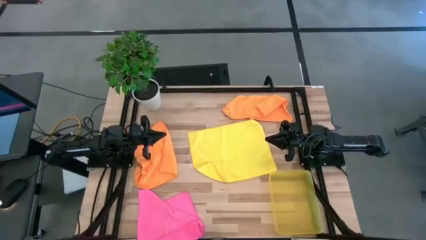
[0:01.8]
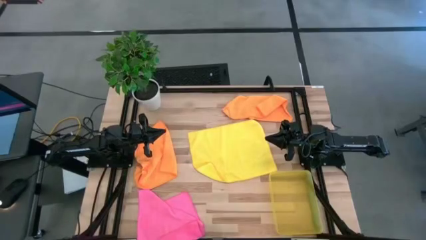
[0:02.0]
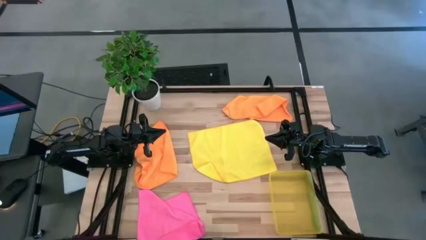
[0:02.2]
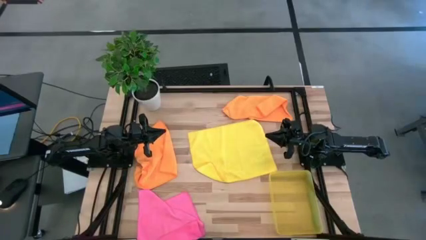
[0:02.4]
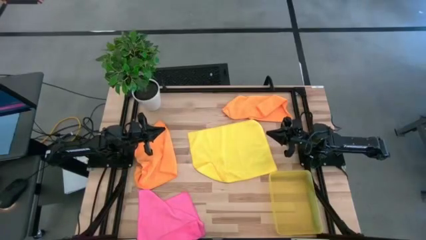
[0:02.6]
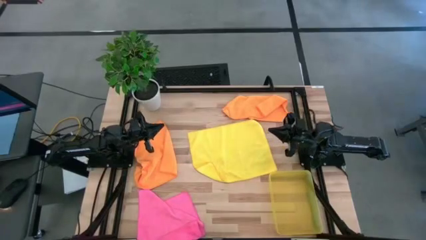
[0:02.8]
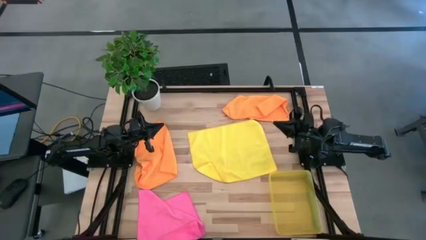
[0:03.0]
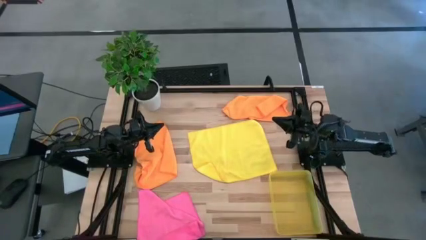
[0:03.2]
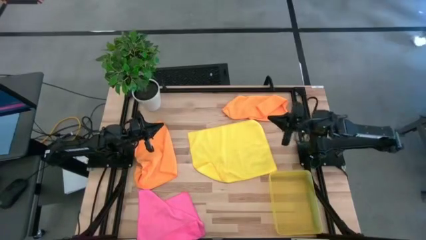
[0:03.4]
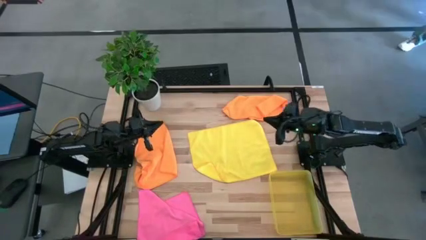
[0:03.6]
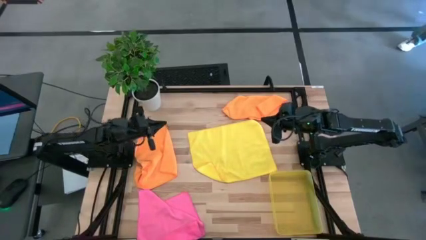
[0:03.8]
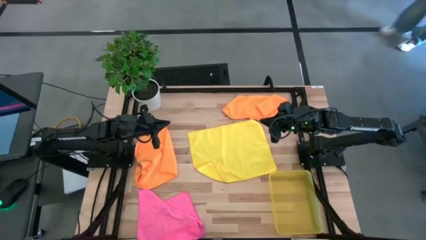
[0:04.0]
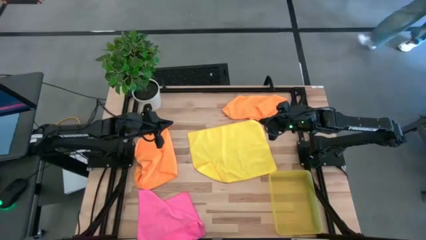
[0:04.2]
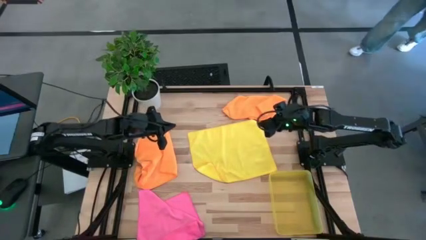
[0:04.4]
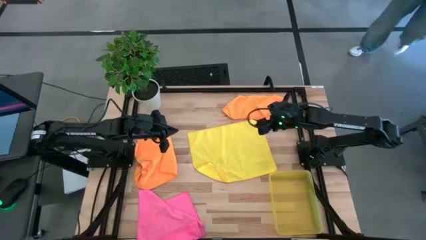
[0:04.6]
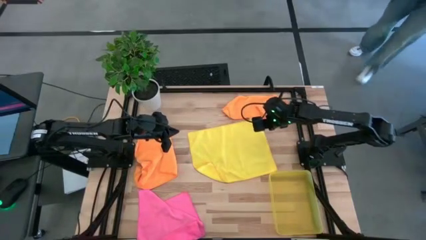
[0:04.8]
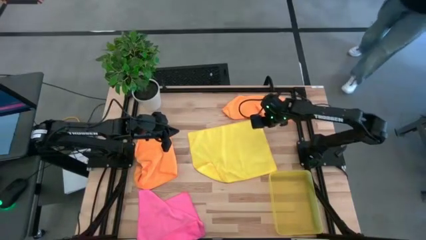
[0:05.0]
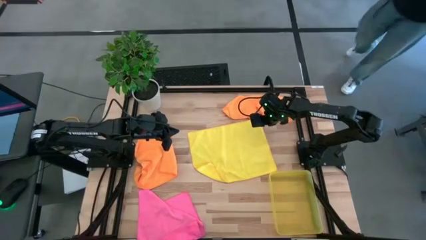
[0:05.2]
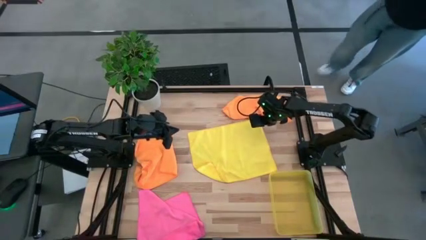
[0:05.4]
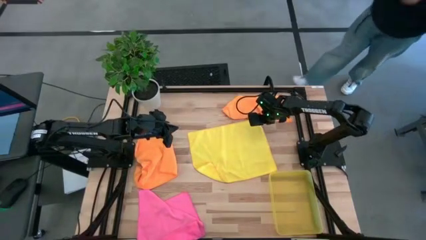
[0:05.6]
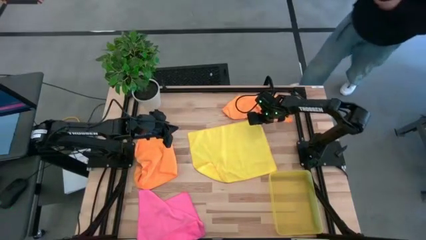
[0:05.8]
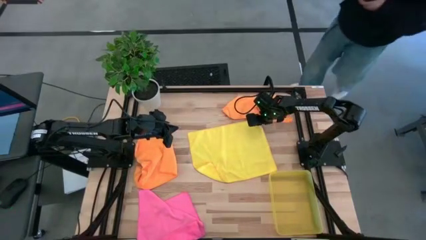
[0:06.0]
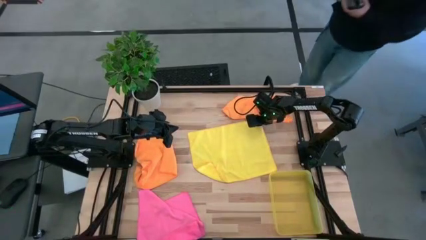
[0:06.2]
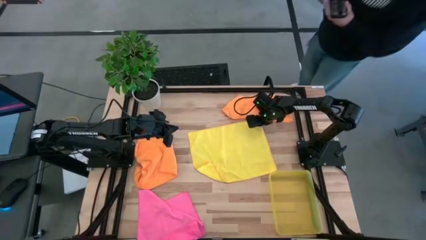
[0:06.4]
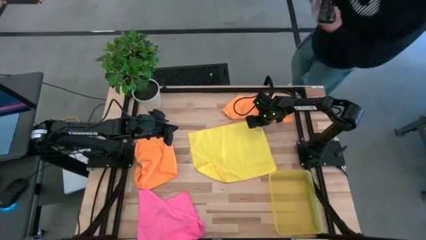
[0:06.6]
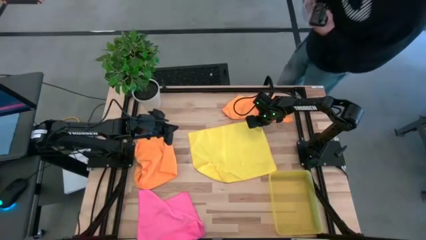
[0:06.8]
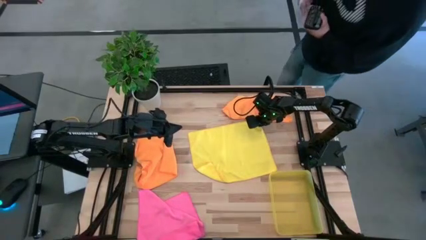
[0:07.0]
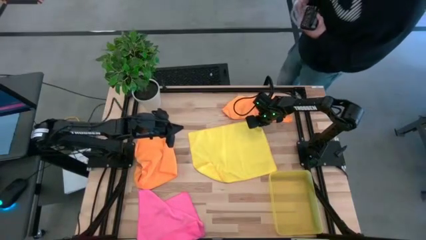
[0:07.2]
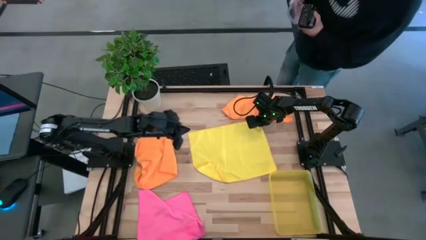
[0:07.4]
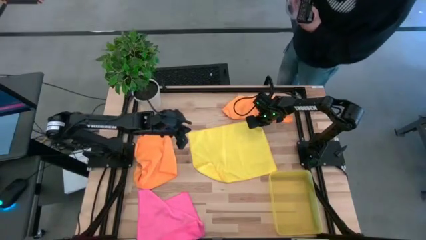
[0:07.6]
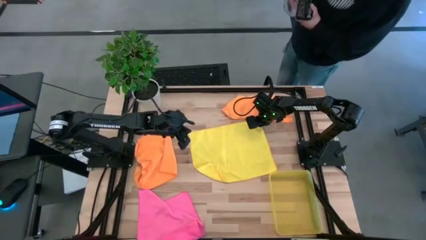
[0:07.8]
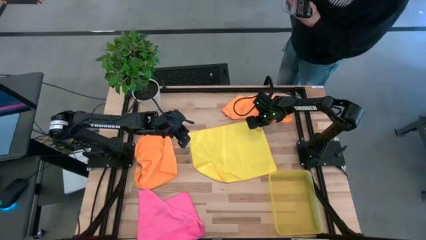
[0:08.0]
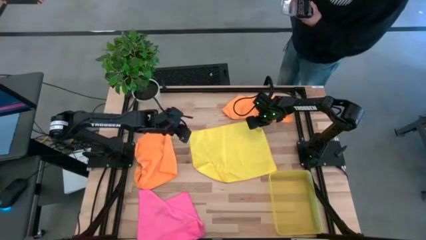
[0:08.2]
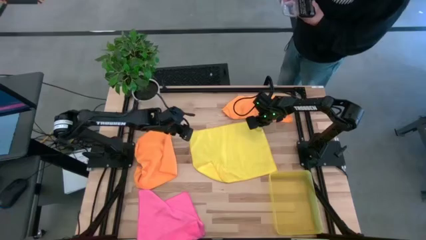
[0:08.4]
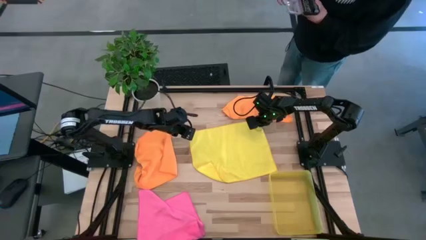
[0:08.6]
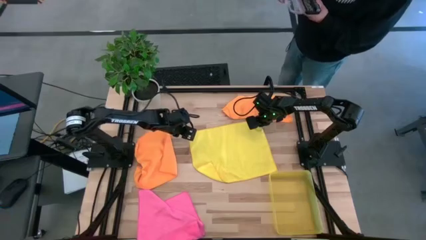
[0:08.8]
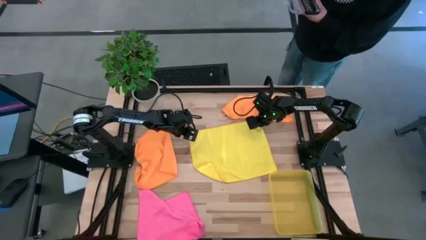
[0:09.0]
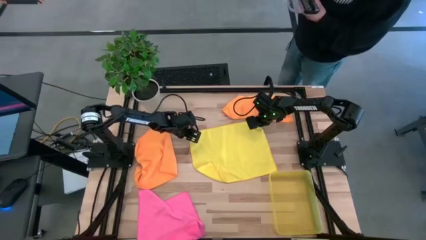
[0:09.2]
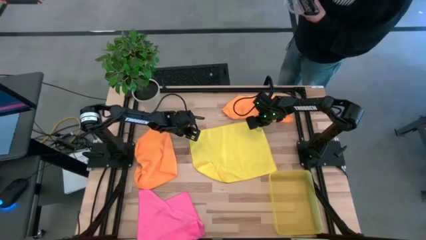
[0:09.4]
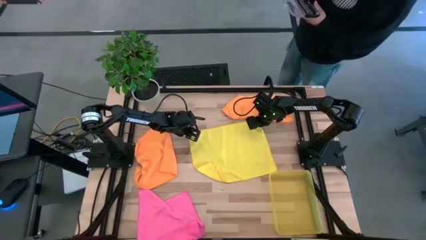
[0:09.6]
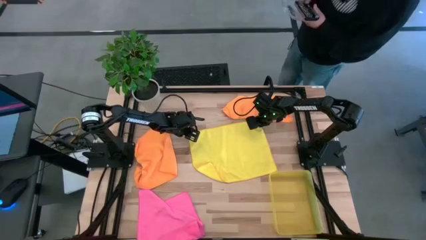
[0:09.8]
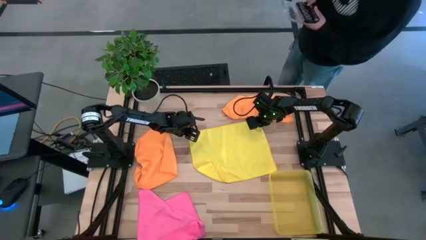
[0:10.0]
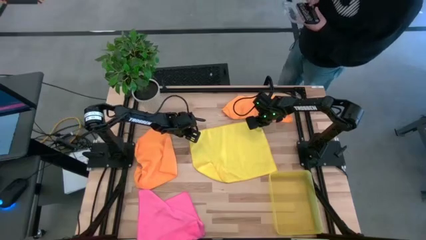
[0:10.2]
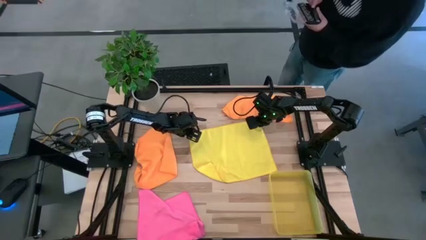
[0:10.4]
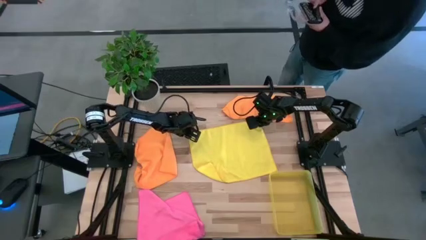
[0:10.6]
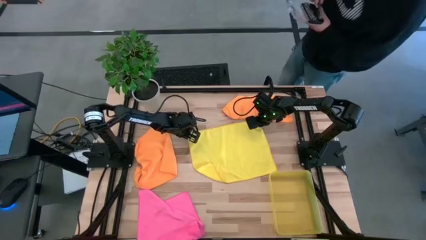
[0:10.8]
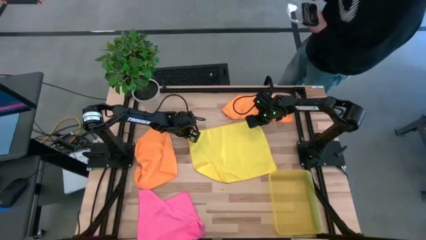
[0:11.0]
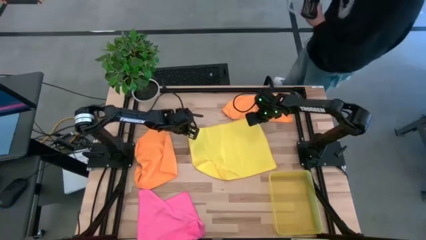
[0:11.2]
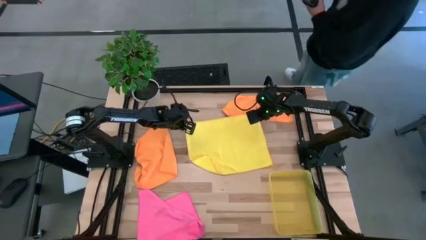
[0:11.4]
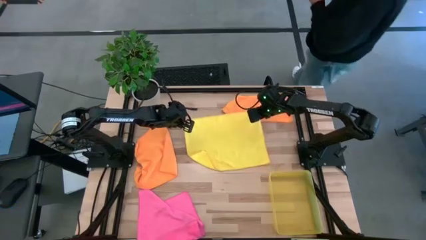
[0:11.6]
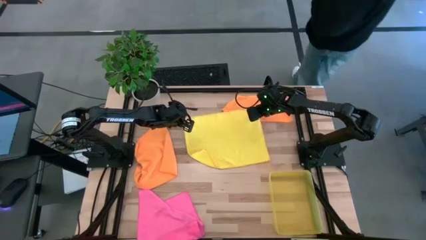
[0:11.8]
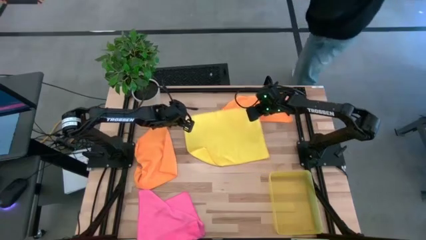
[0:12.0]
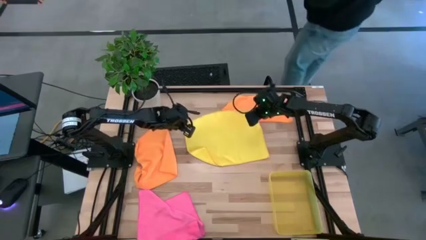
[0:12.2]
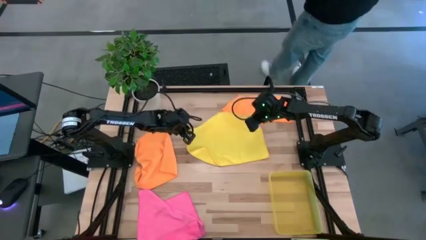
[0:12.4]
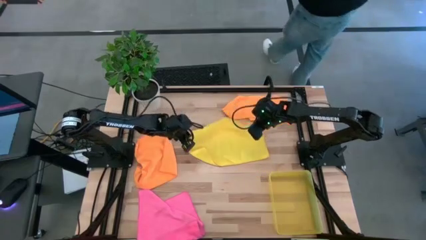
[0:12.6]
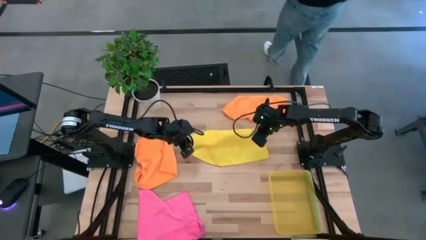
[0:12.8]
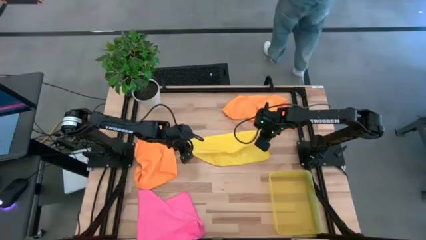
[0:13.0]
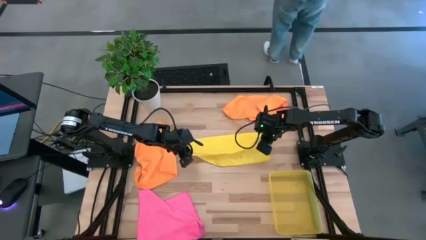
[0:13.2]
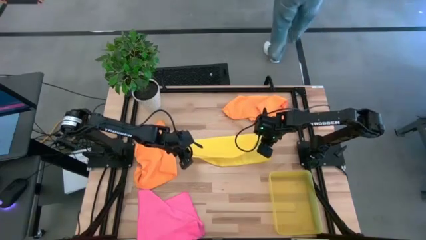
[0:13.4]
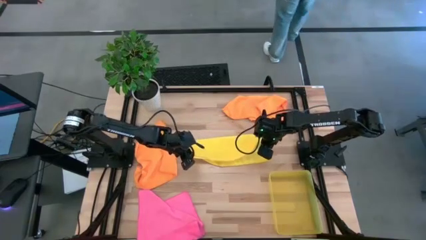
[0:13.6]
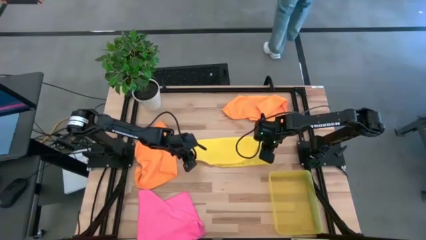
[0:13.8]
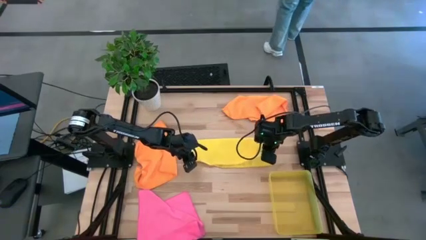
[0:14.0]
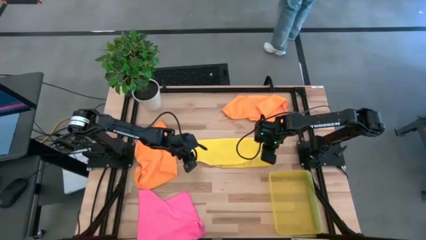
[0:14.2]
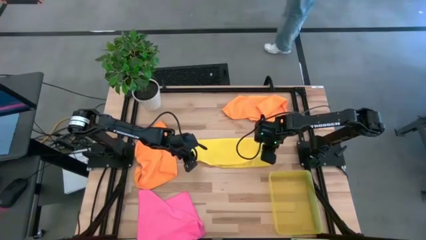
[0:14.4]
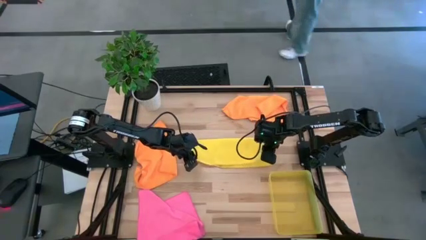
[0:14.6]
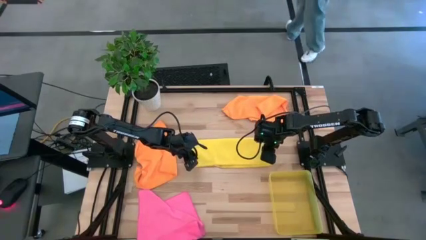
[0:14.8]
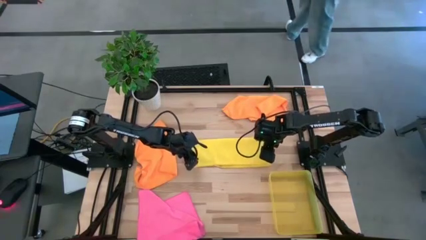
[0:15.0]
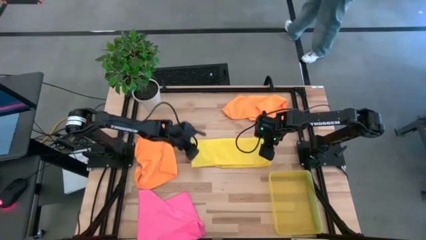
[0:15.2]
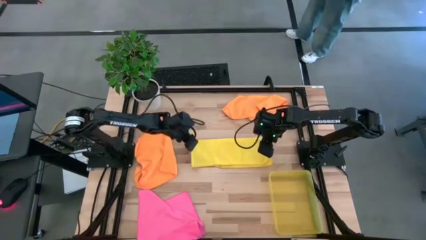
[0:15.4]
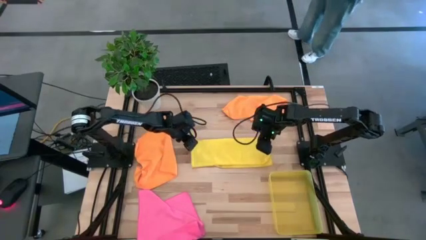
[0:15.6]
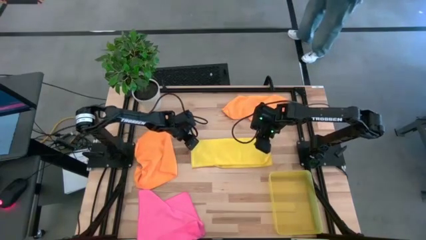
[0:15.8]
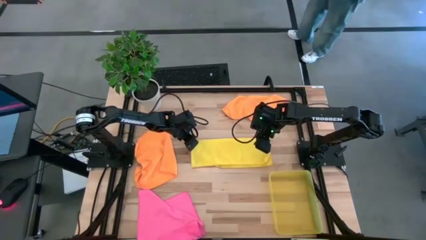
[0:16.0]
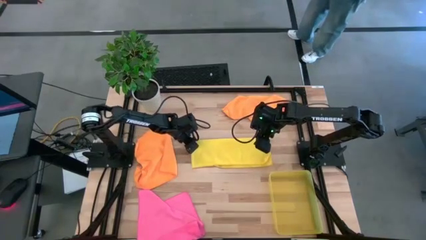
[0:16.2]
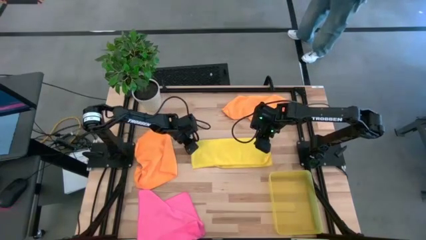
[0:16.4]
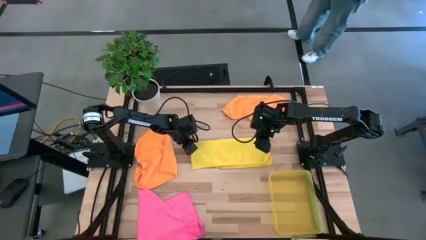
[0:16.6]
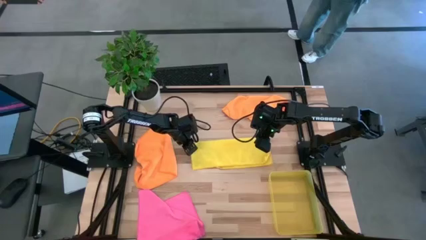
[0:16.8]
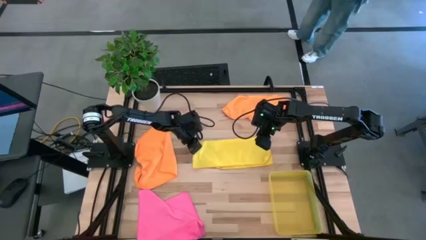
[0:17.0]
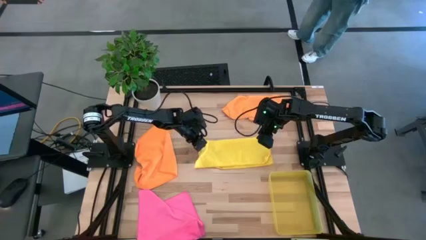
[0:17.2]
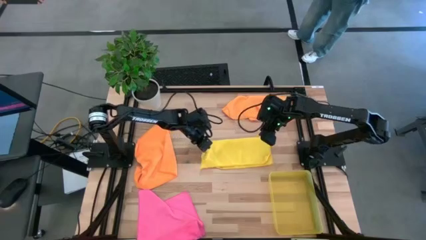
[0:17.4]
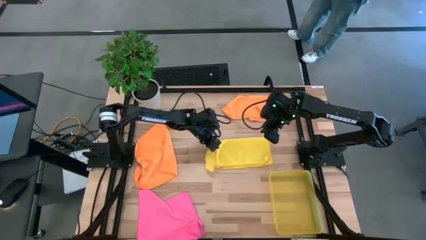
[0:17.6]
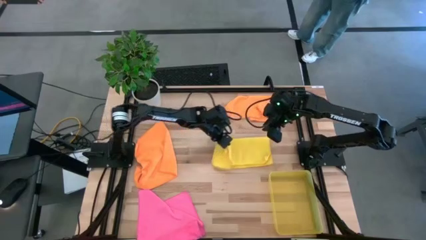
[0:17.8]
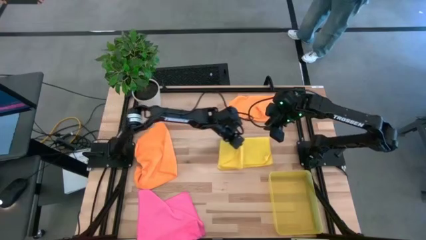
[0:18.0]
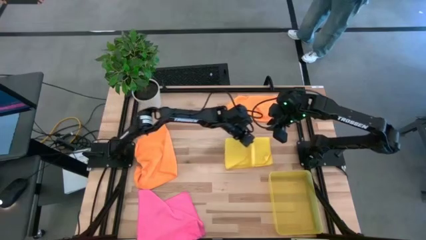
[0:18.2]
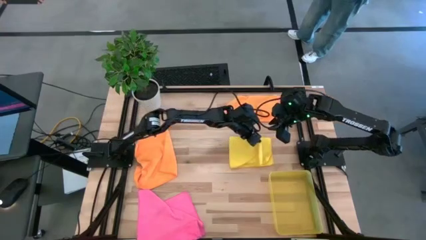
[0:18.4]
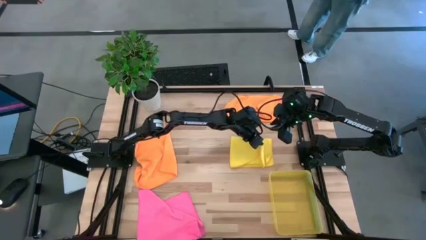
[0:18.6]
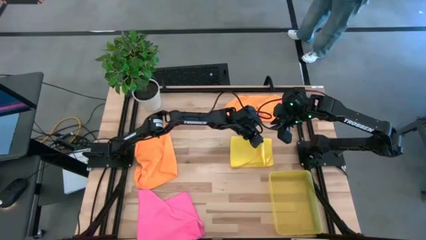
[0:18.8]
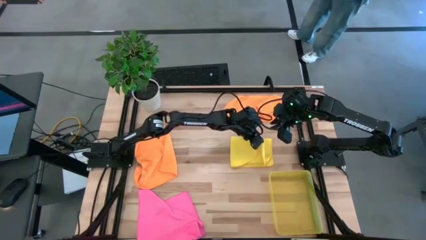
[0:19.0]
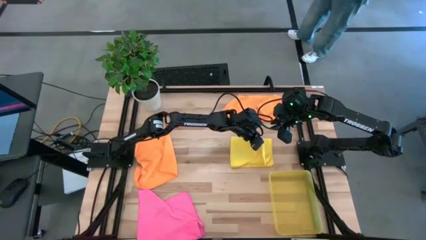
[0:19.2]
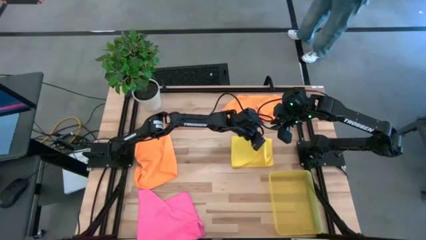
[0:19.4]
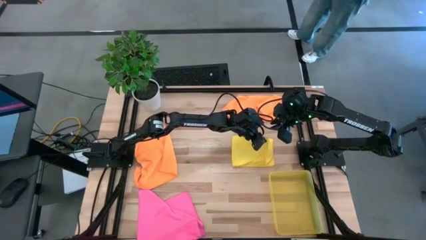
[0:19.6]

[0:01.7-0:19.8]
Task: Fold microfiber towels
Fold the yellow cloth
